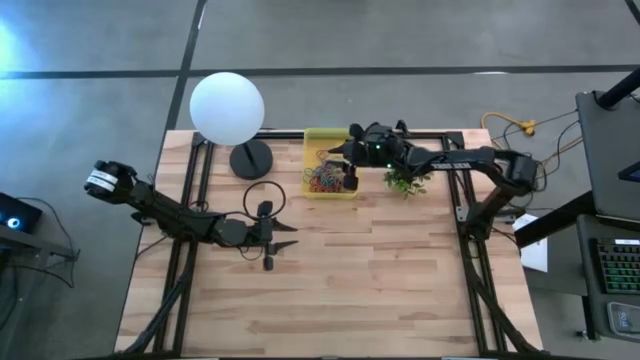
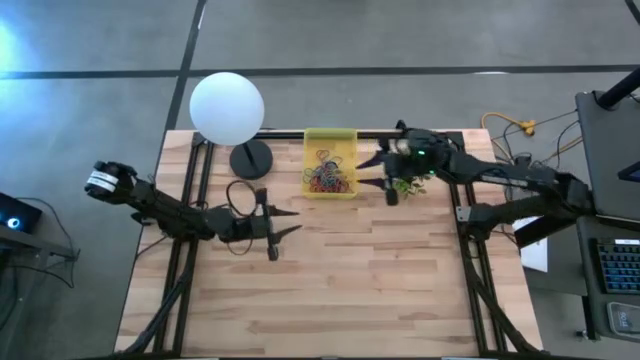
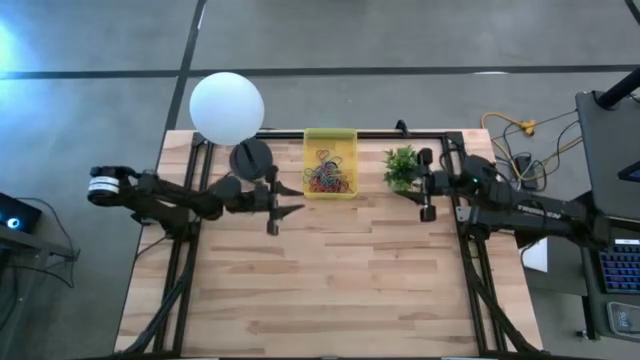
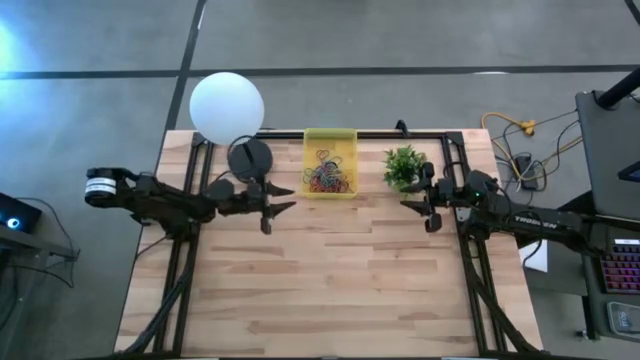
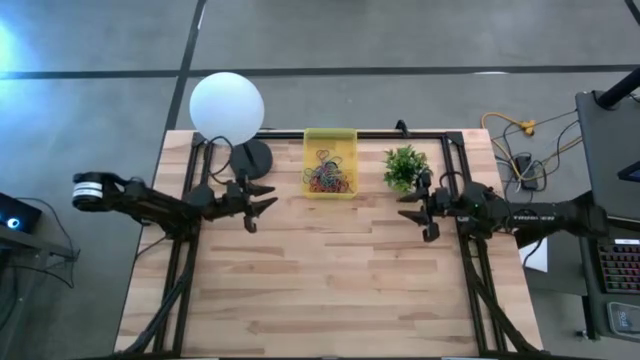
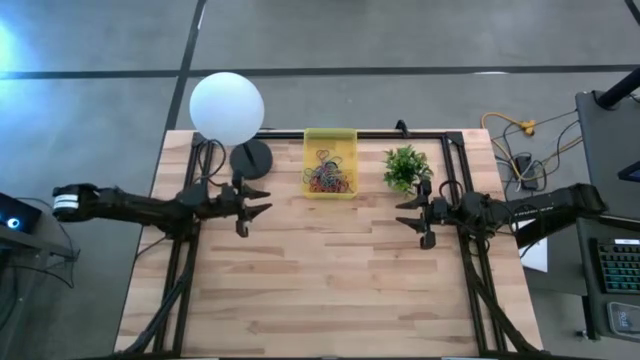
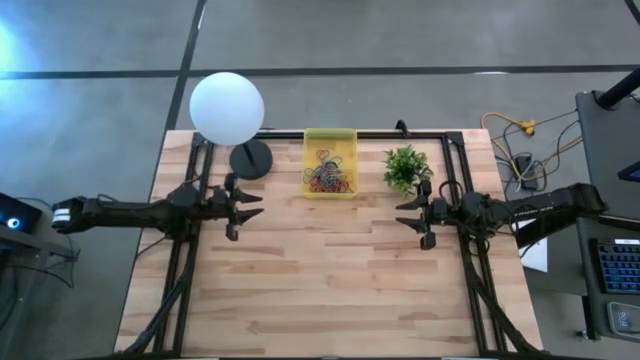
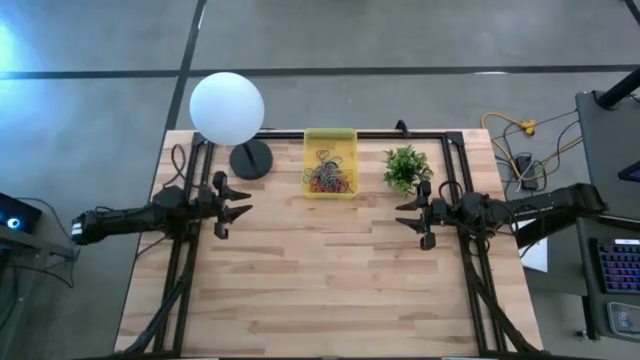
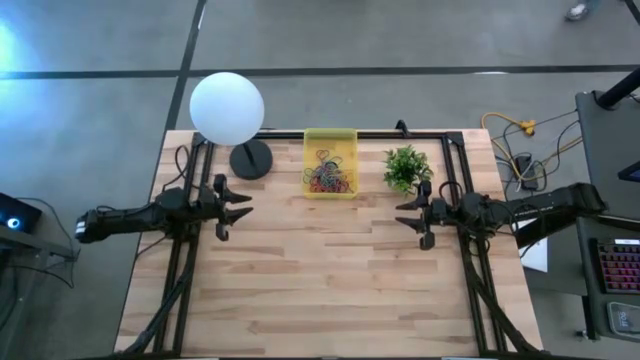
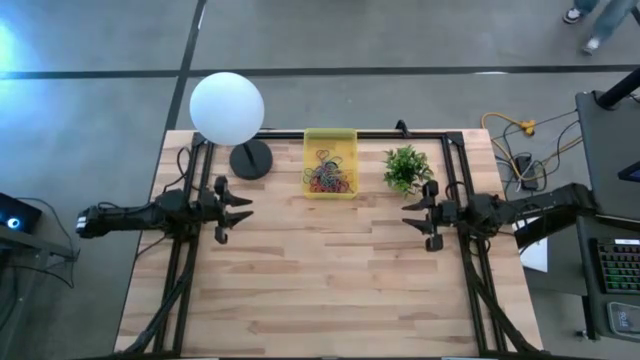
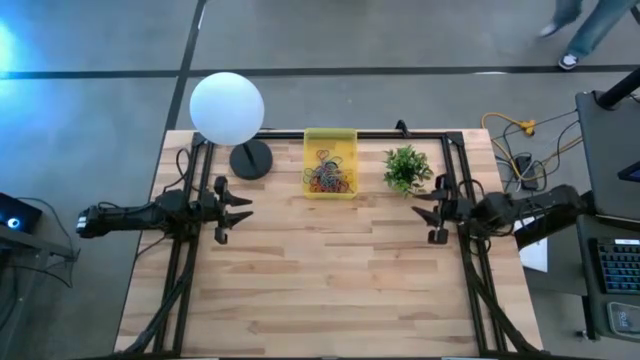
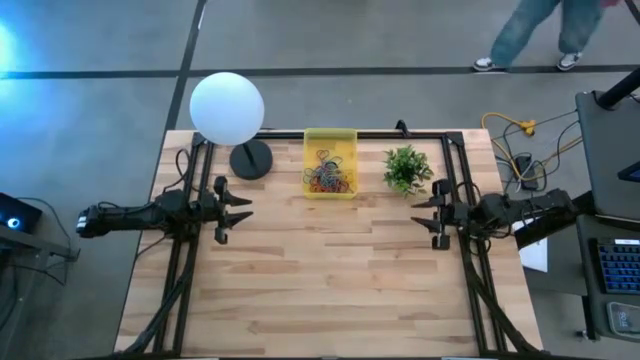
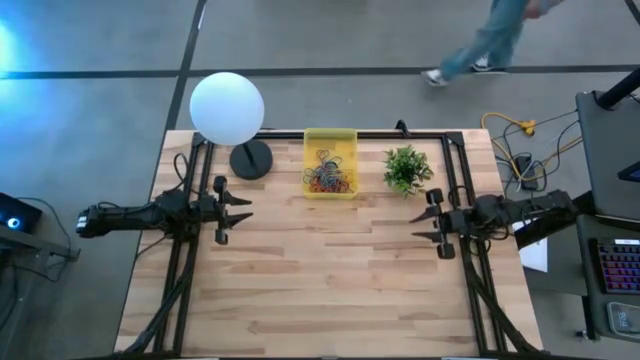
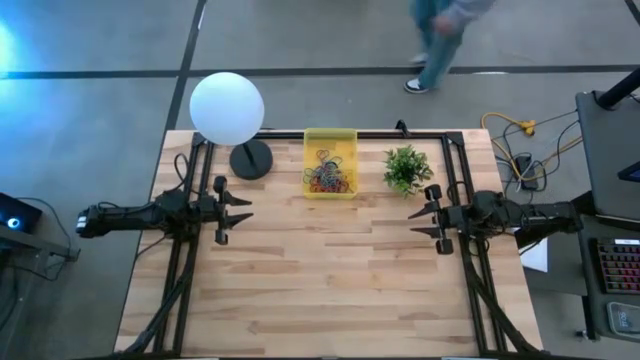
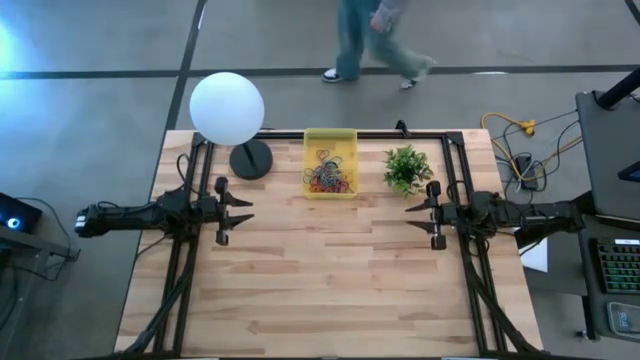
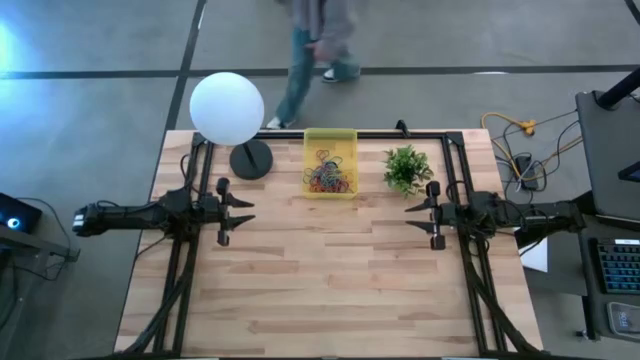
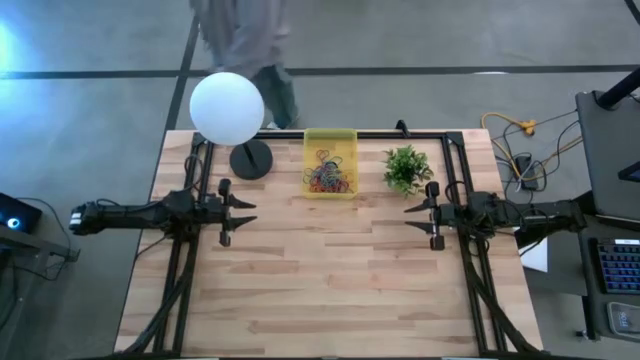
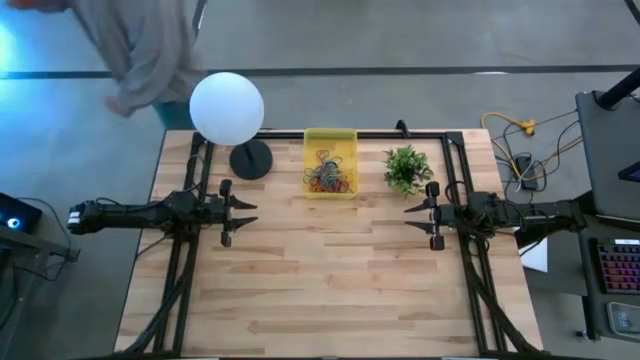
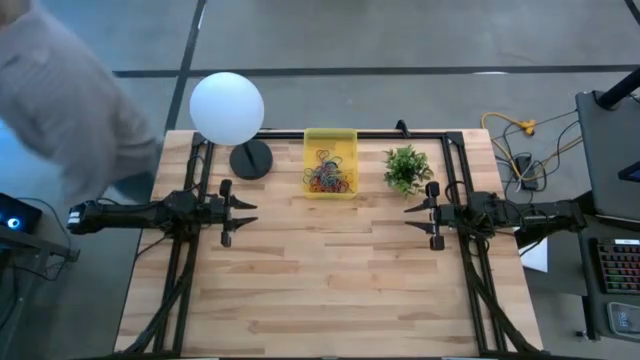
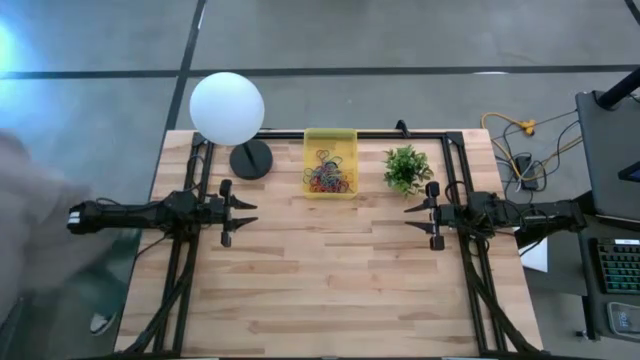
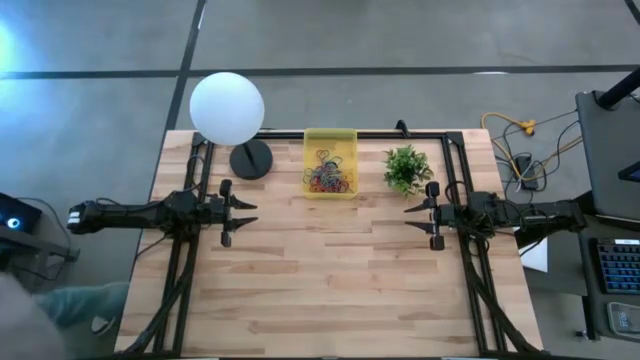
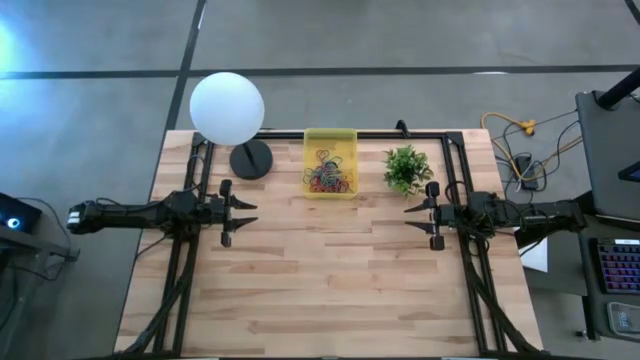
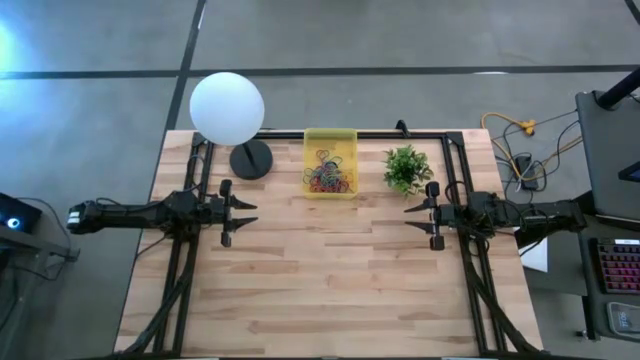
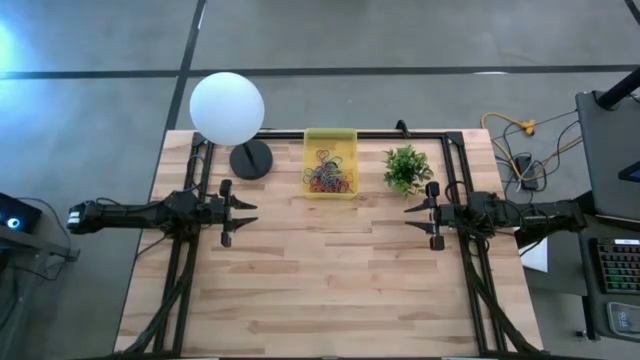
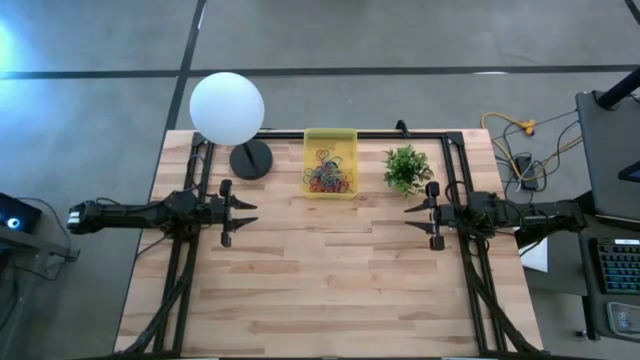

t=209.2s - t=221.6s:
Task: Pick and place rubber bands into bin
Return to Home Position
